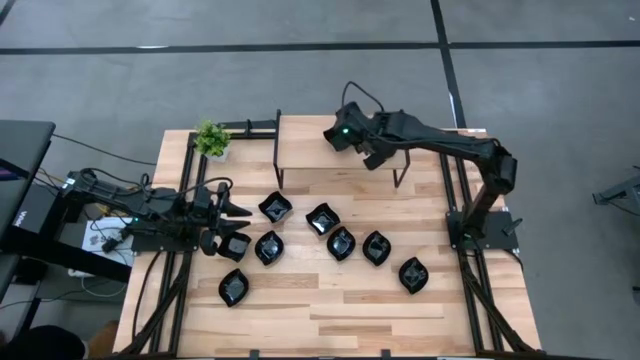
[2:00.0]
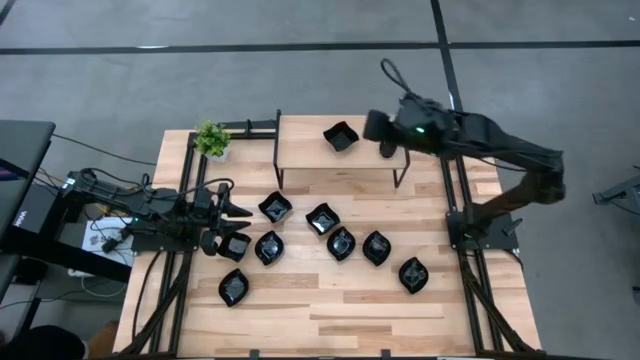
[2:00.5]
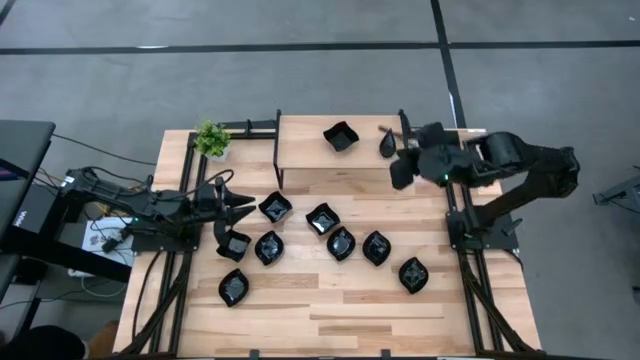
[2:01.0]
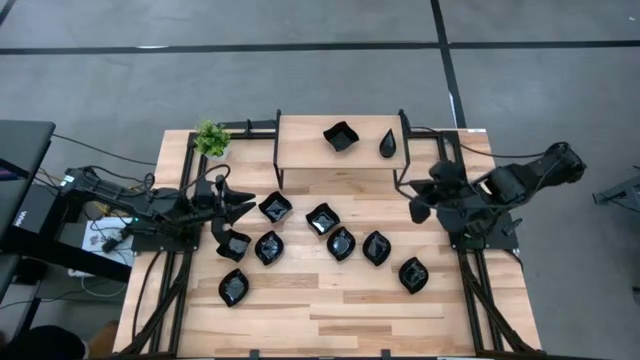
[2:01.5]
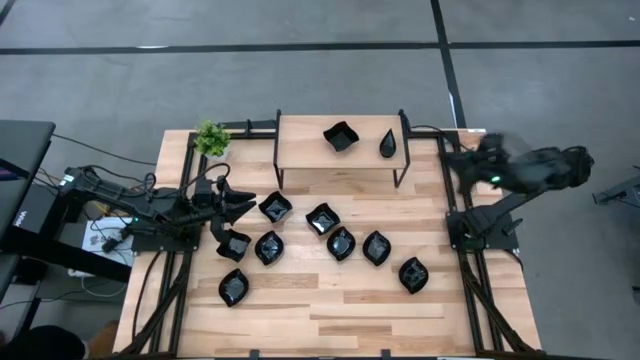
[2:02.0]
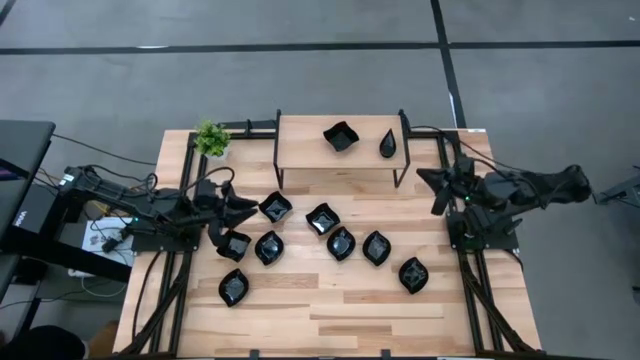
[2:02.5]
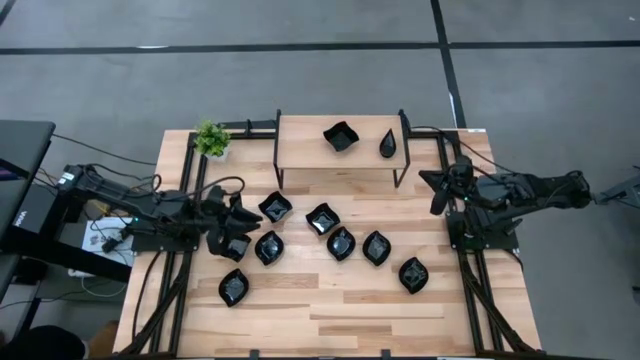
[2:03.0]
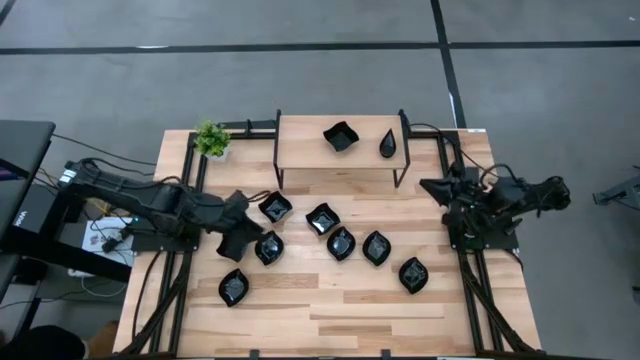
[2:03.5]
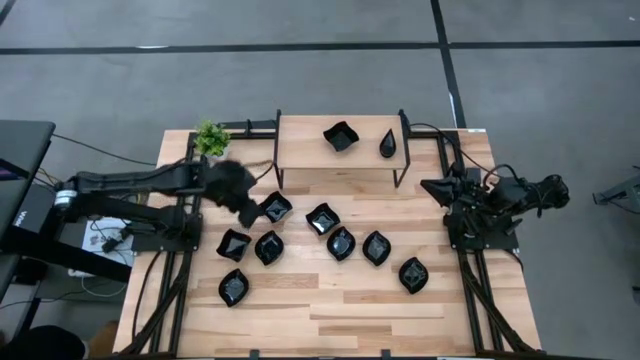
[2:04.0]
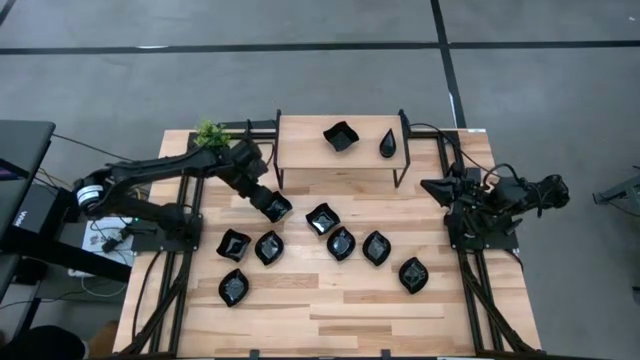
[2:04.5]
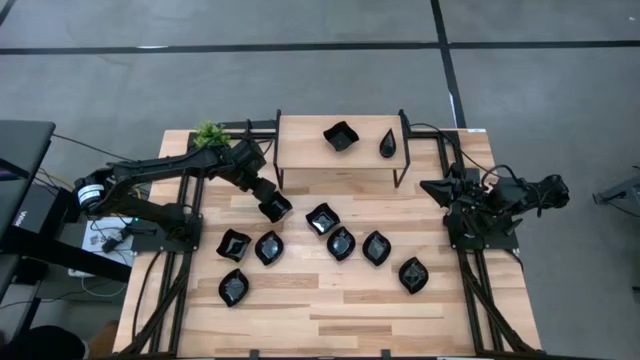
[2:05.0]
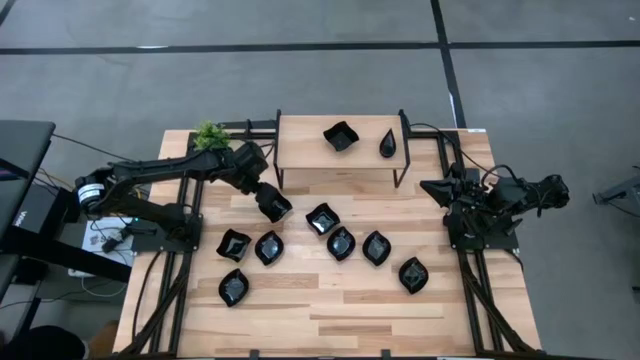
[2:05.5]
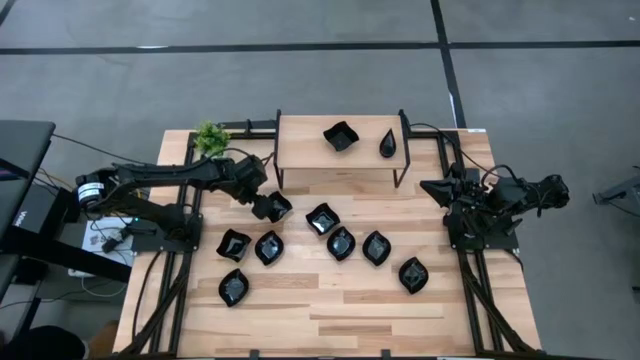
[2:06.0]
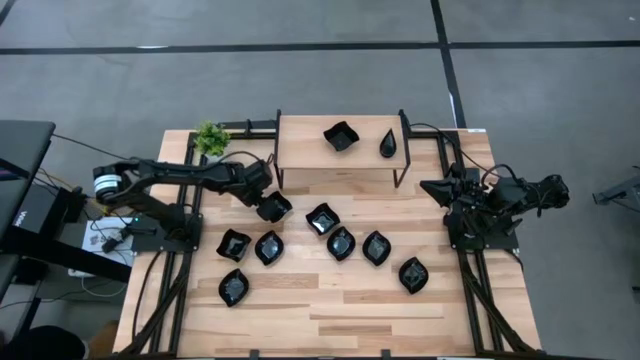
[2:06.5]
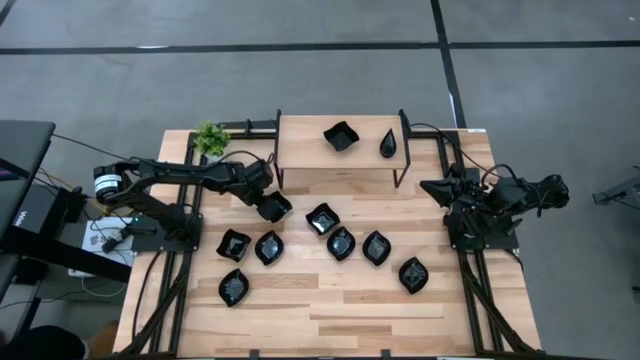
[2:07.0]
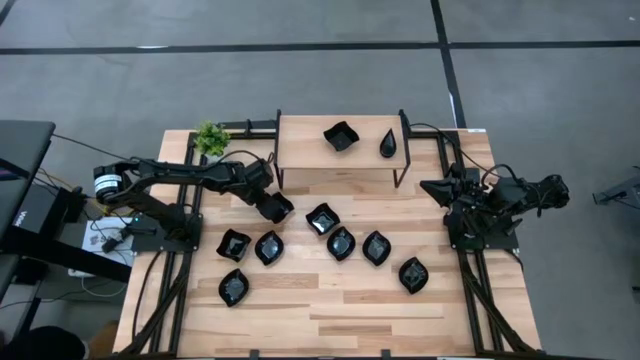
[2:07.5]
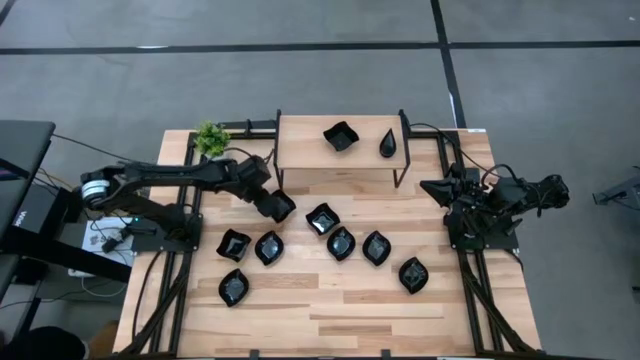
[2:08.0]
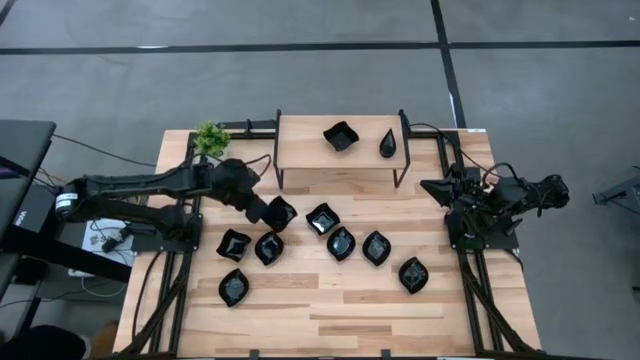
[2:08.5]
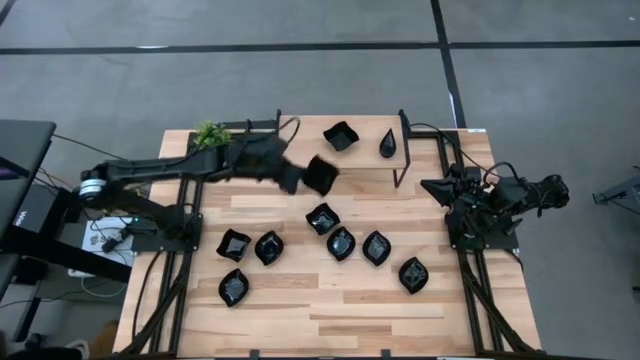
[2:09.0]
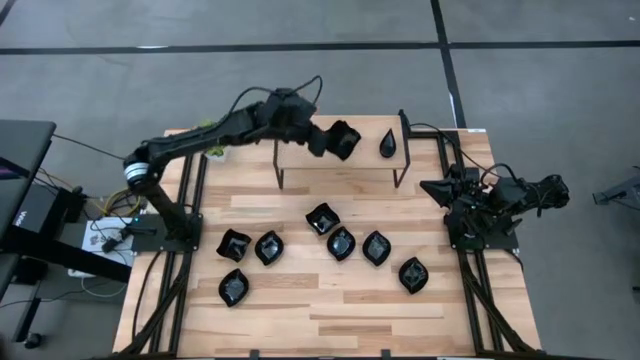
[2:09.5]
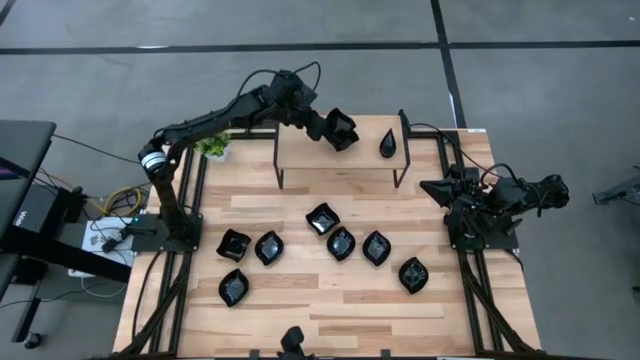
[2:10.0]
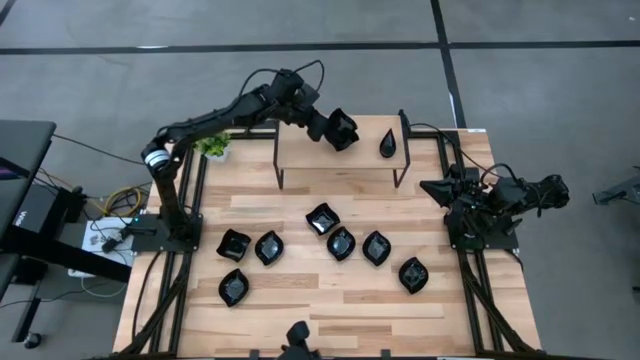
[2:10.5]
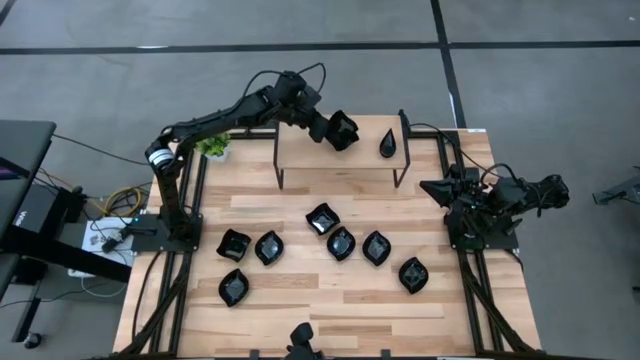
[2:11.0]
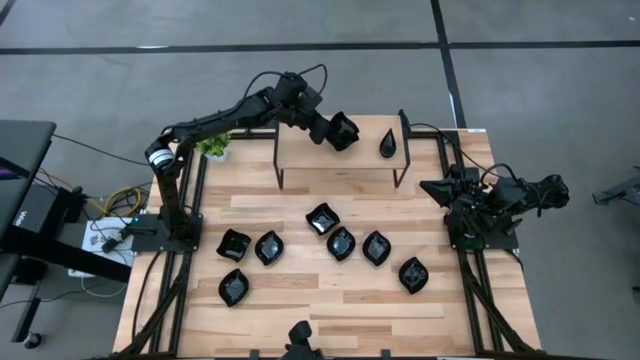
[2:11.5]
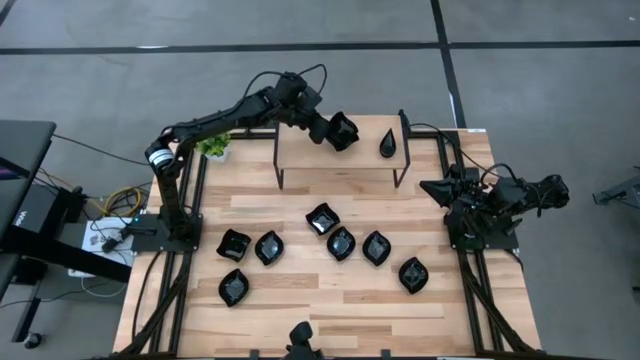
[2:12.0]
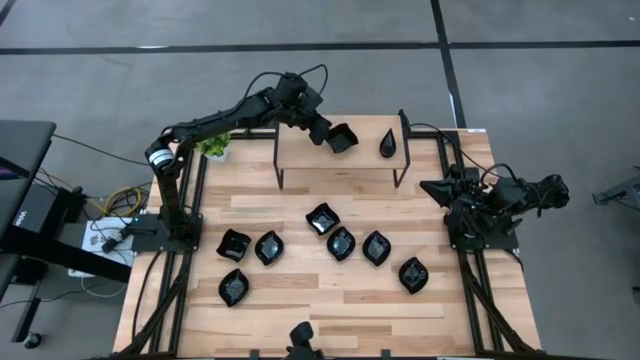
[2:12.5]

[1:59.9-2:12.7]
Task: Pick & Place Mini shaped plates
Stack the black plate on top of the black plate on the shelf

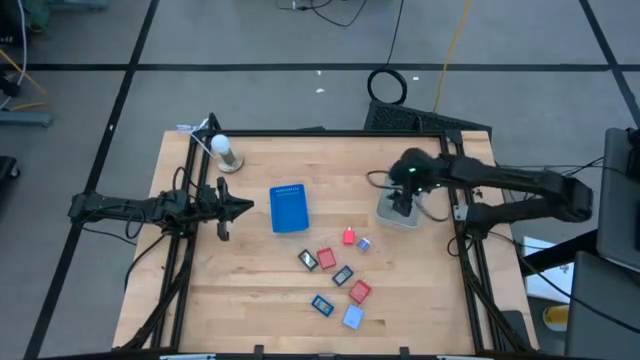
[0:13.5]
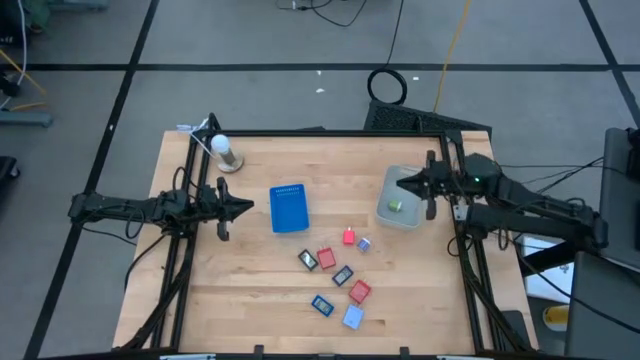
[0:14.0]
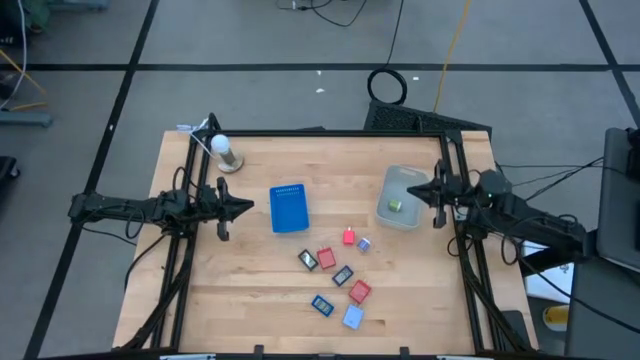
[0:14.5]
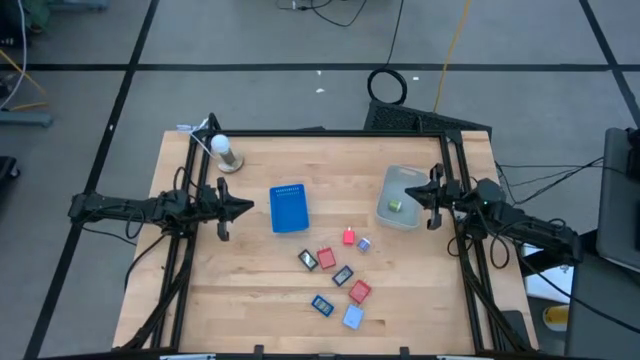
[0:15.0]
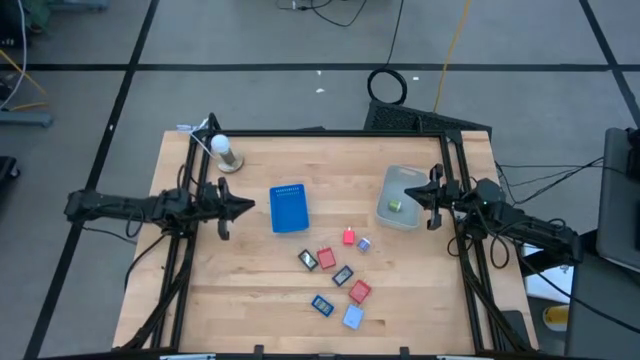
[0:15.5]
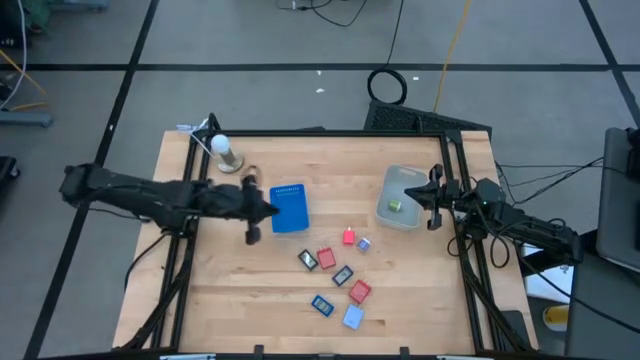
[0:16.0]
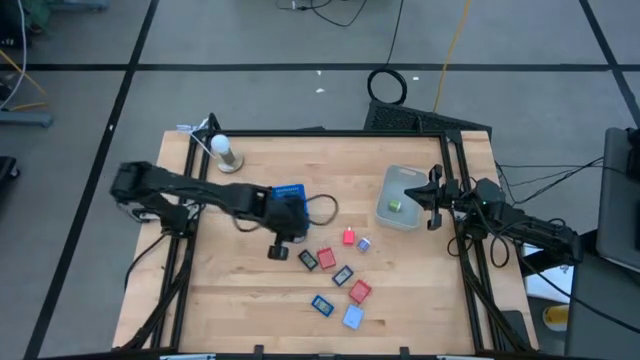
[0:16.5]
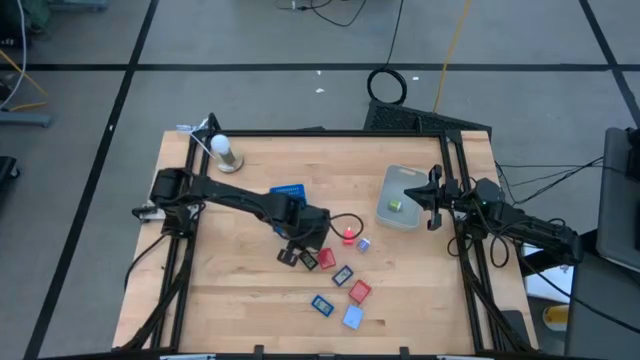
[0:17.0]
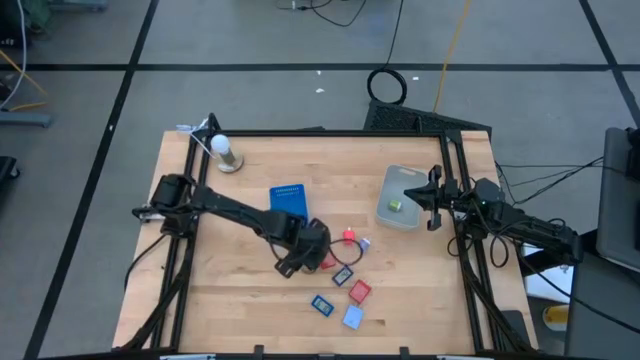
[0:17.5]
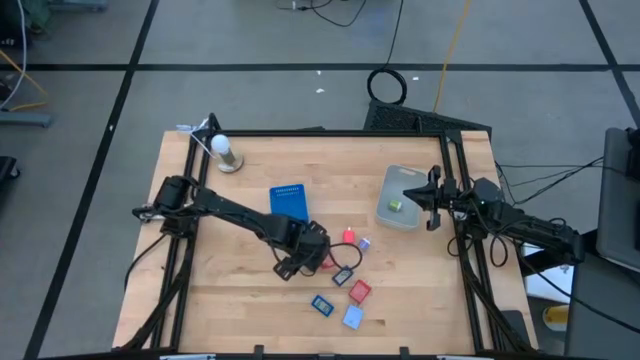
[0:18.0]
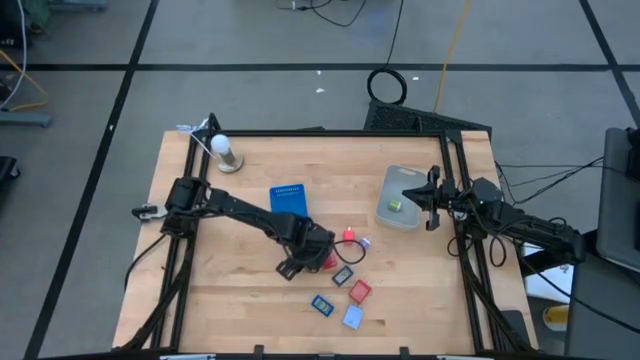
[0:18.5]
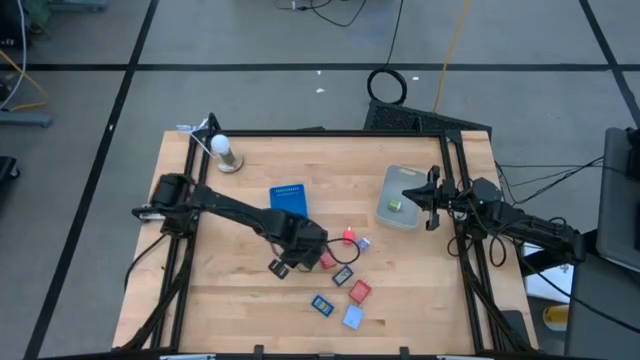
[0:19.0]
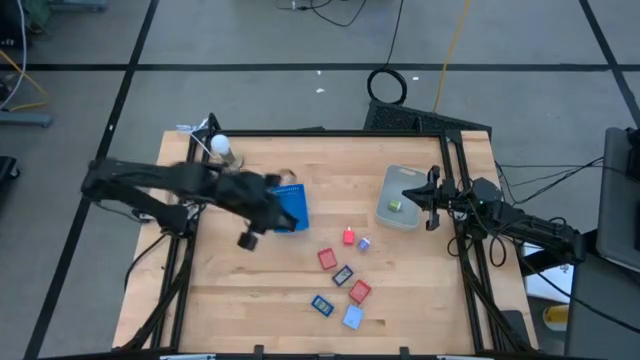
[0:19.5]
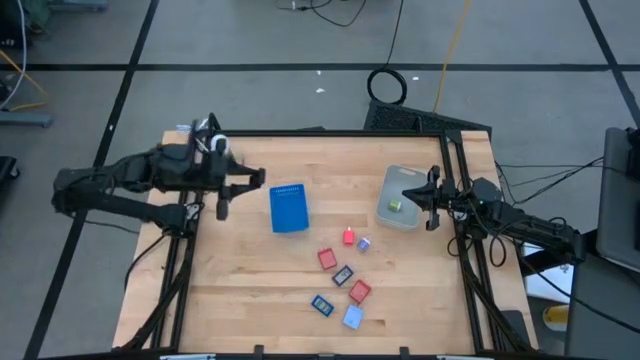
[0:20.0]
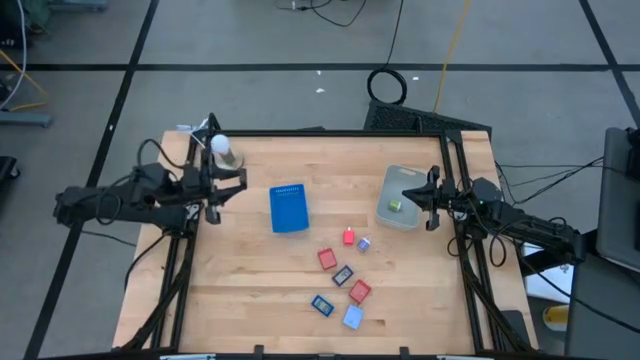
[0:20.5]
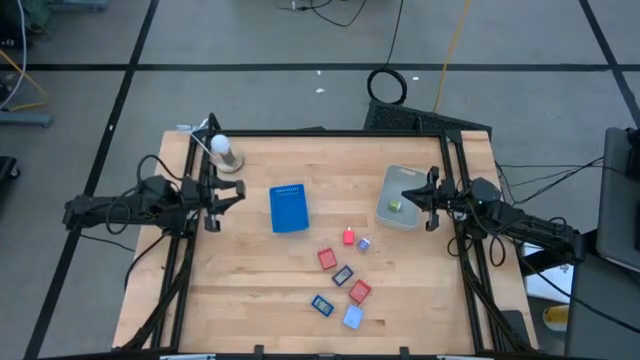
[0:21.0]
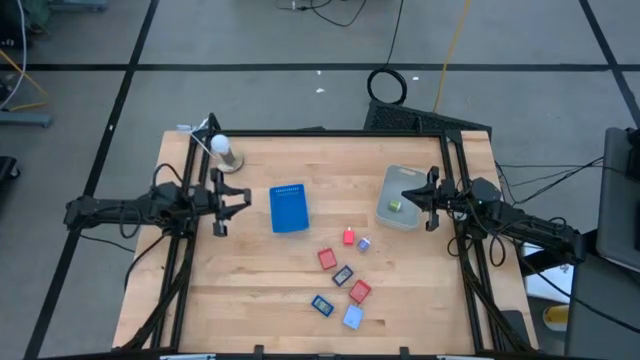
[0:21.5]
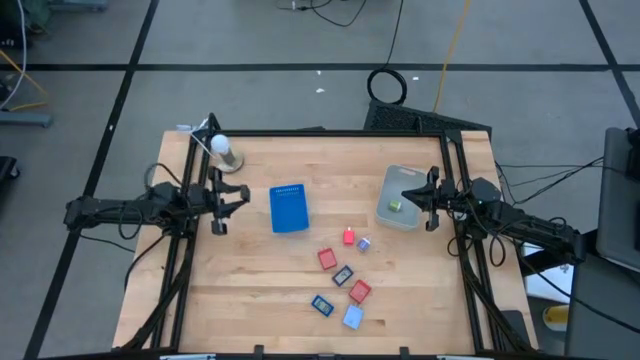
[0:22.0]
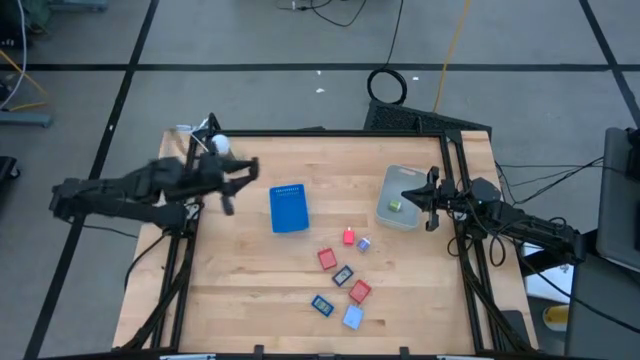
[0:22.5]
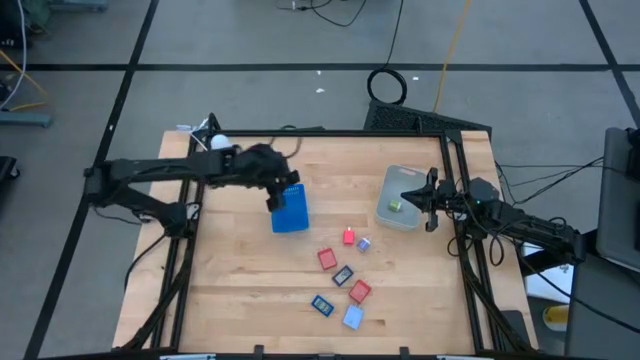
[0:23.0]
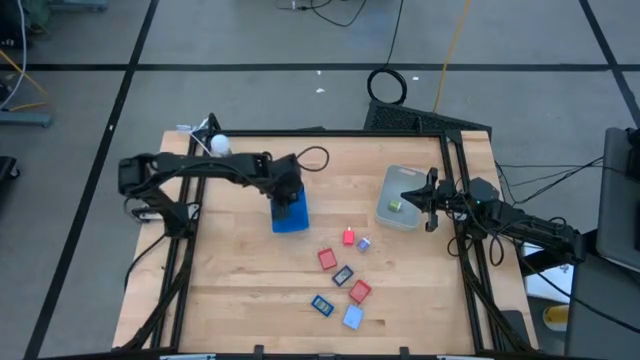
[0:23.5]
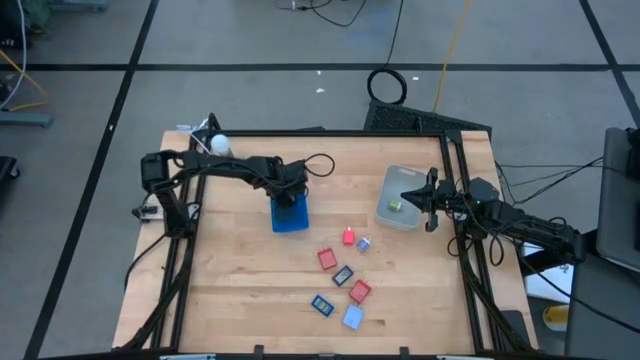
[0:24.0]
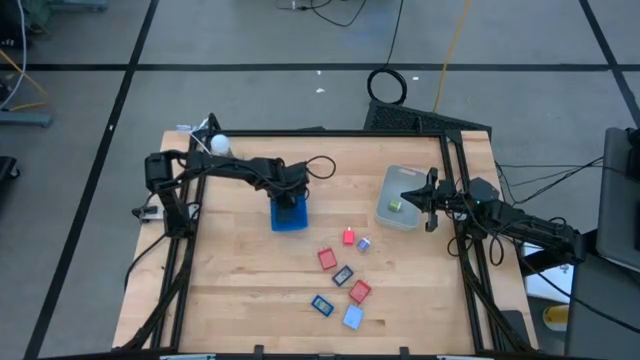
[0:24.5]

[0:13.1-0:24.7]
Task: Pick & Place Office items
Put the black digital clock into the blue bin
